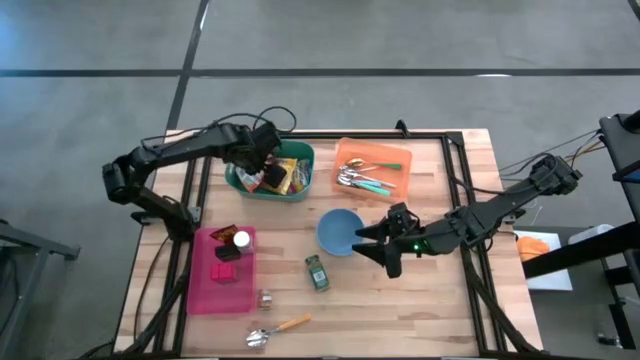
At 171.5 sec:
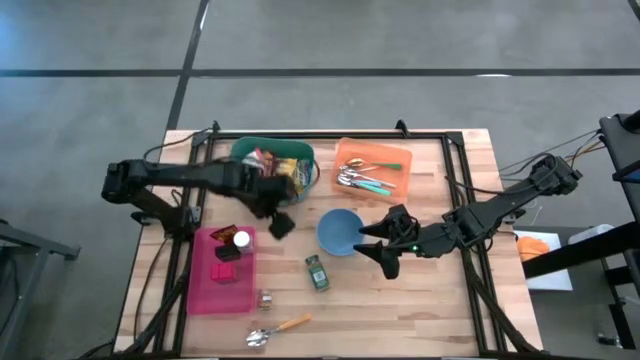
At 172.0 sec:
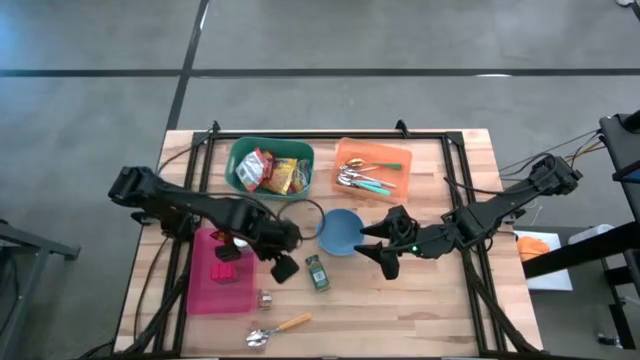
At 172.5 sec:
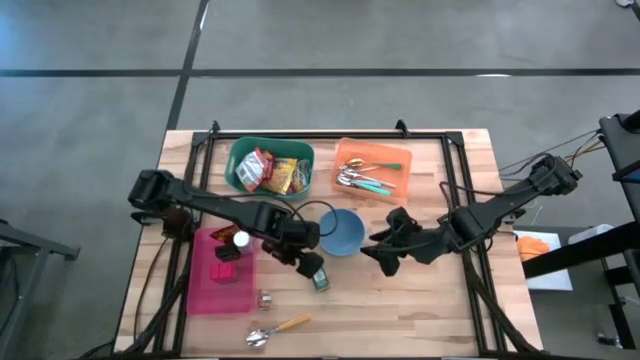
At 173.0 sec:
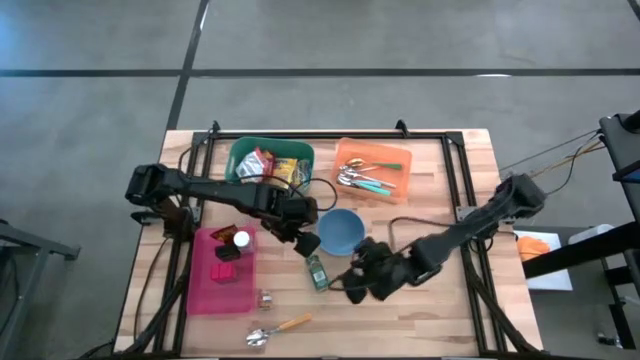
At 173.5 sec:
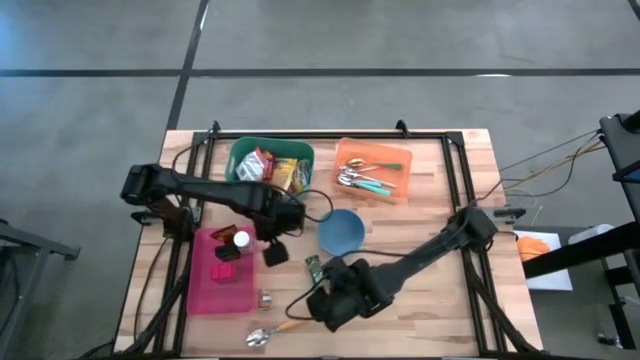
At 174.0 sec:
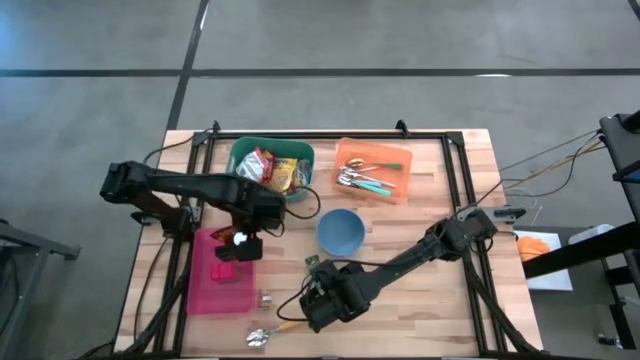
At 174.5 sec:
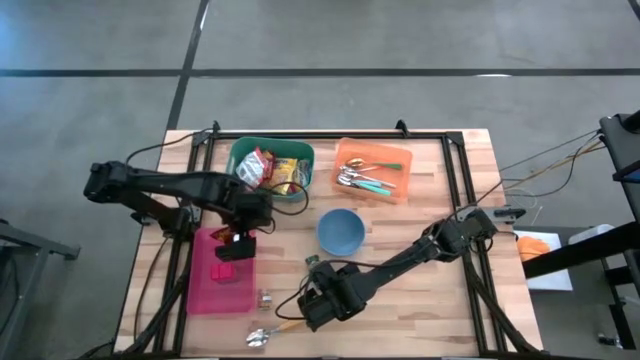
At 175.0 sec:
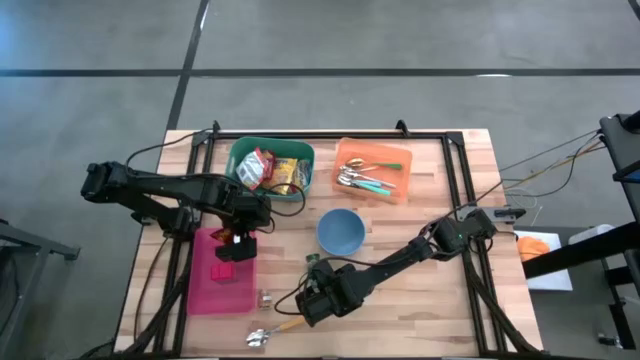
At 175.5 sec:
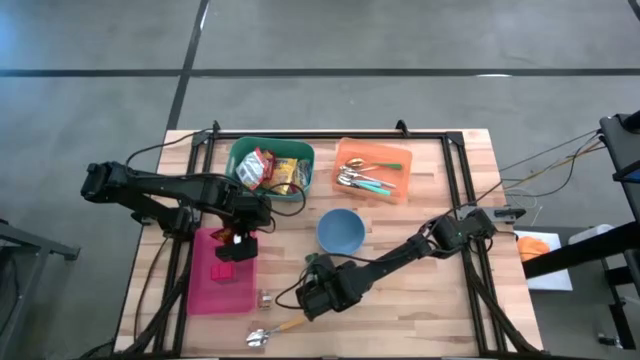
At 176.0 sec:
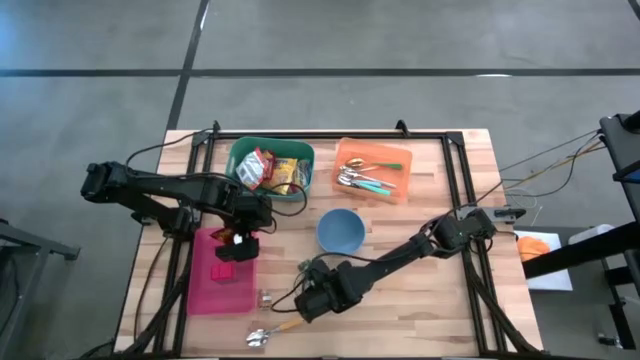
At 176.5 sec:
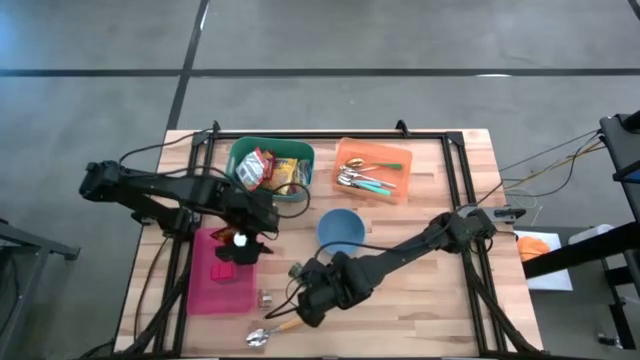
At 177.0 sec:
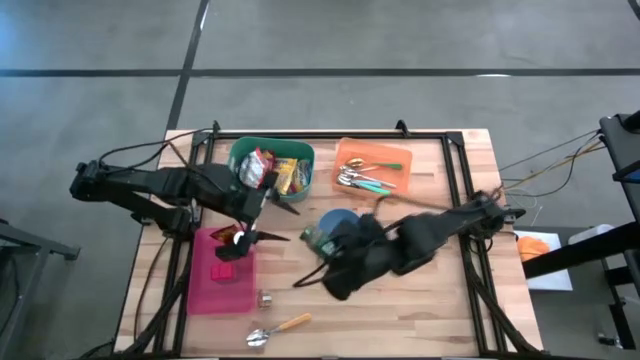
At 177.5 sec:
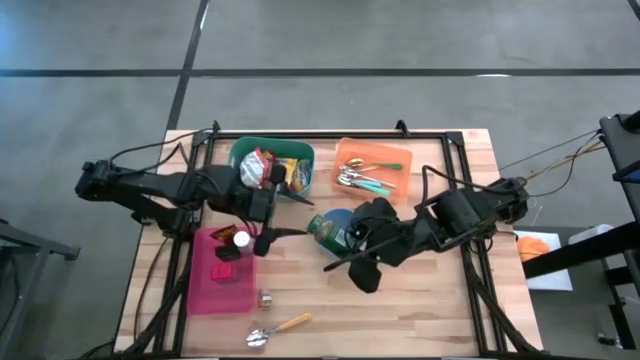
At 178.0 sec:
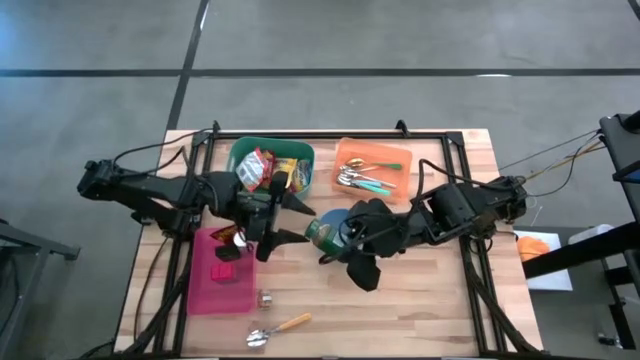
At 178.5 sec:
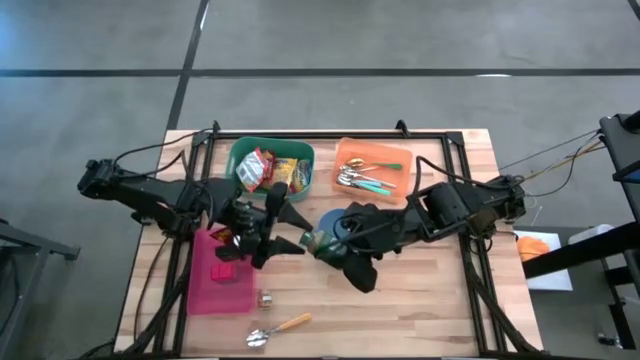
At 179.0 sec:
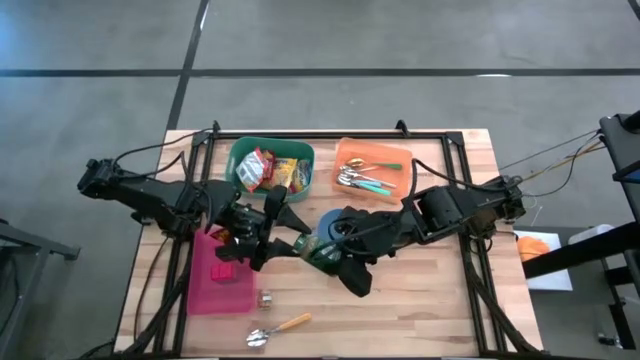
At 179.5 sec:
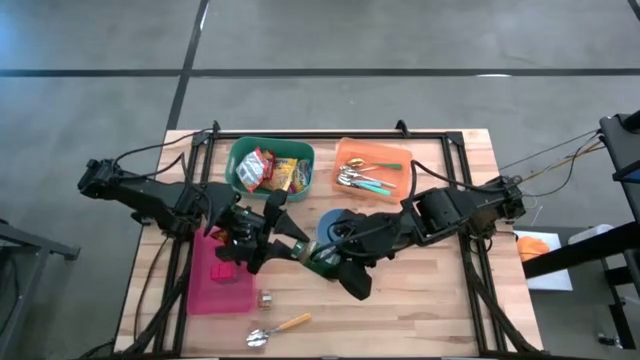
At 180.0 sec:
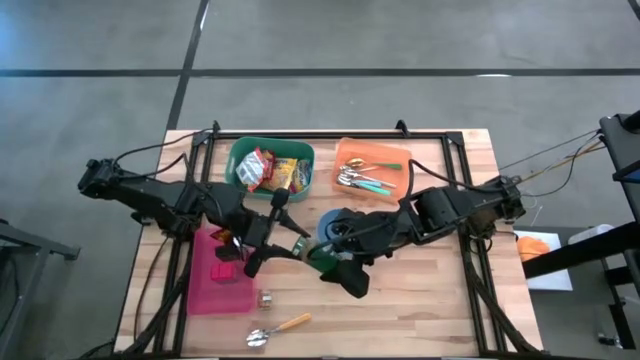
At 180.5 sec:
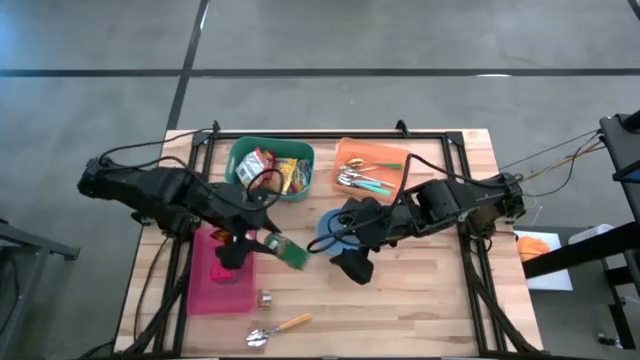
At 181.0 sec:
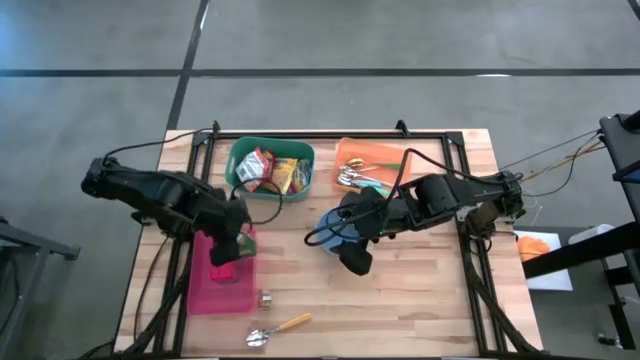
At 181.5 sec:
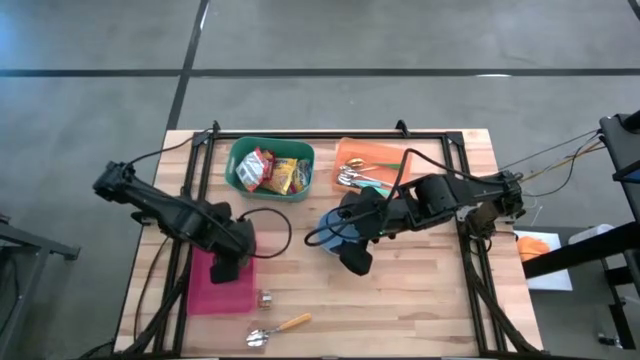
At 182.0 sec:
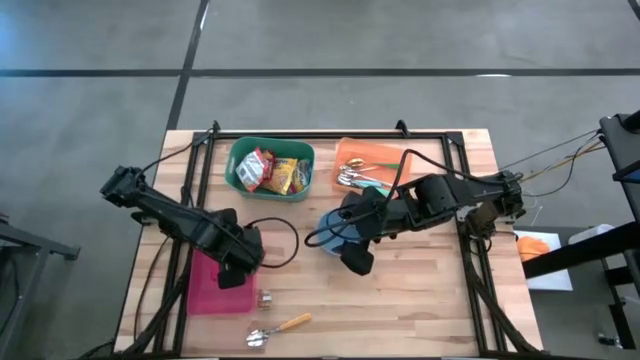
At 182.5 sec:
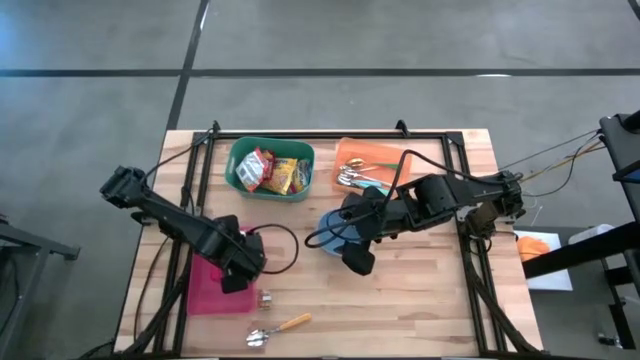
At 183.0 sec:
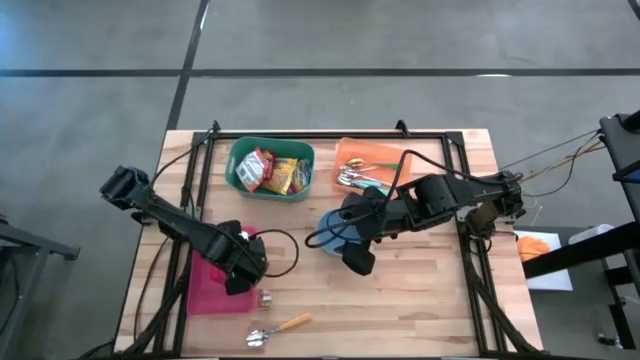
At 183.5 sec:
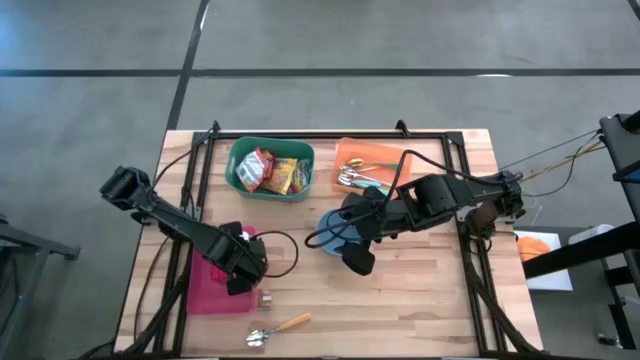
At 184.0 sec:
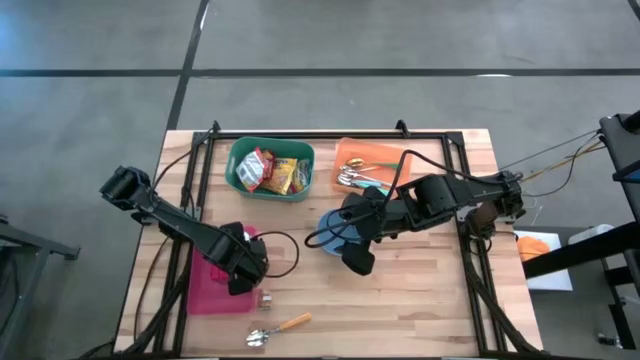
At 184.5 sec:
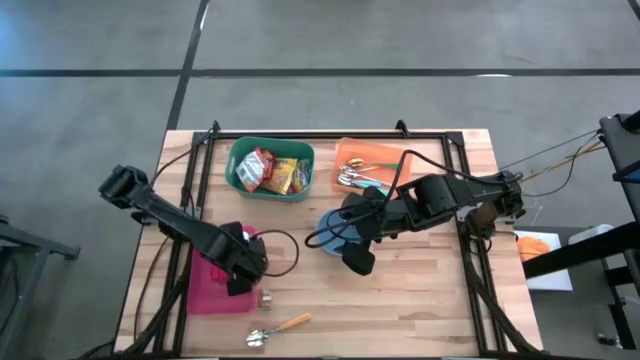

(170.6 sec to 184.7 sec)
Put the green seasoning bottle into the pink bin

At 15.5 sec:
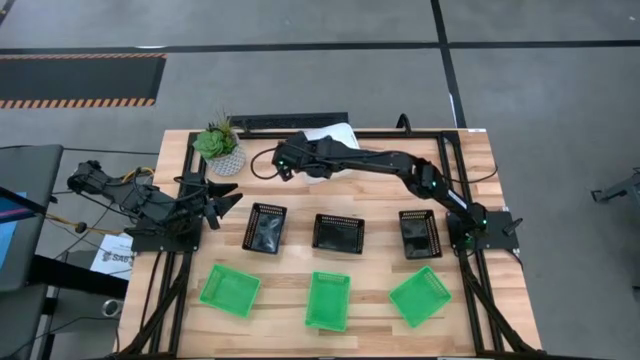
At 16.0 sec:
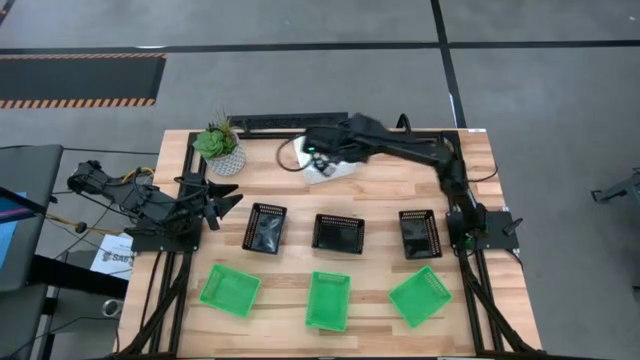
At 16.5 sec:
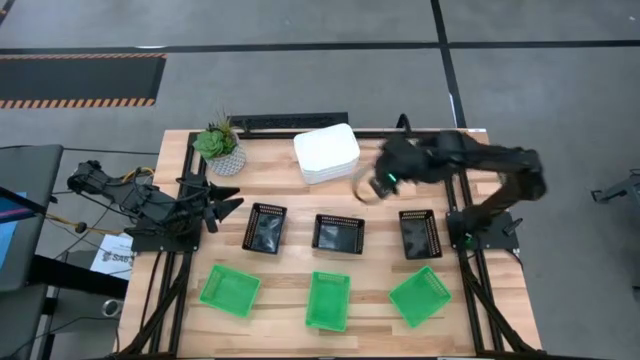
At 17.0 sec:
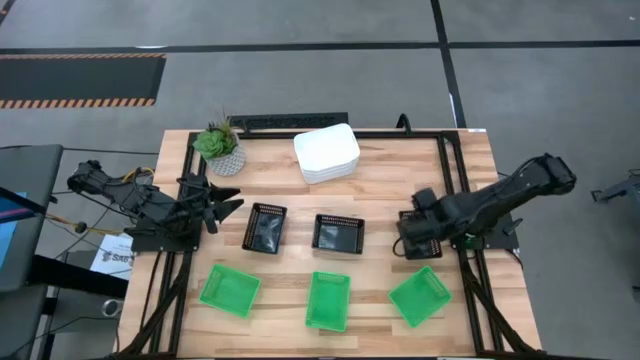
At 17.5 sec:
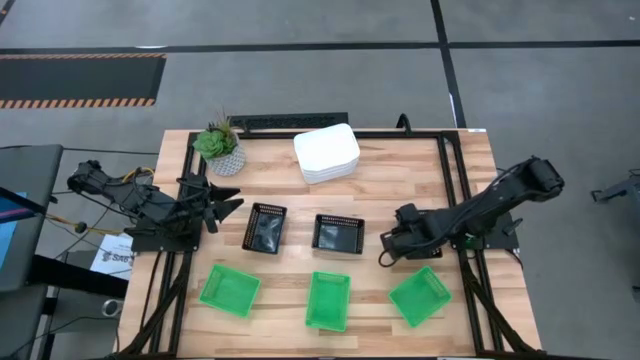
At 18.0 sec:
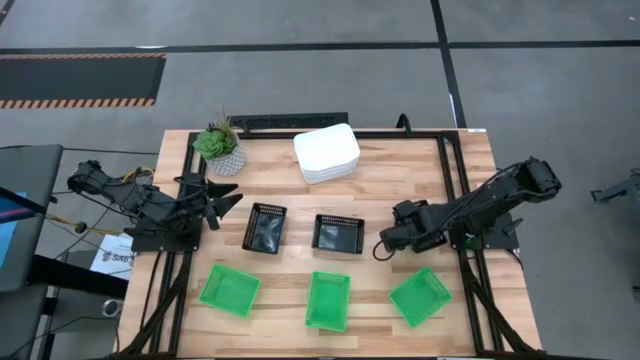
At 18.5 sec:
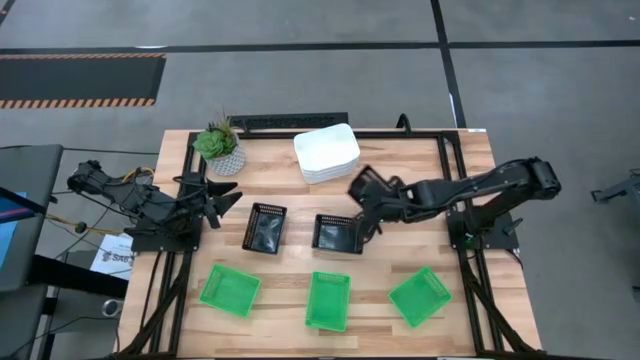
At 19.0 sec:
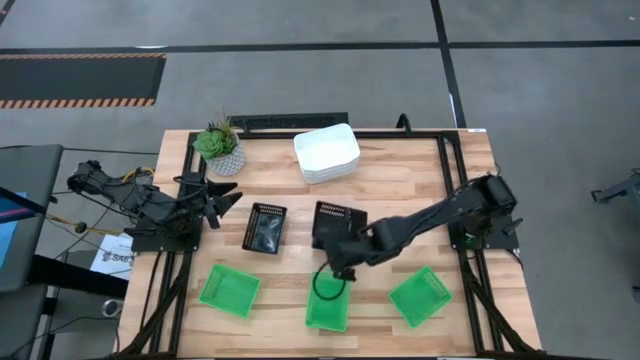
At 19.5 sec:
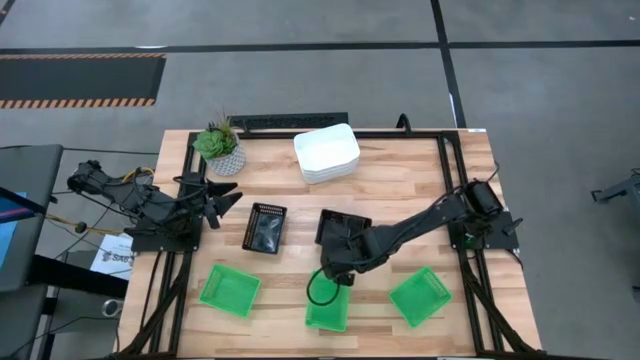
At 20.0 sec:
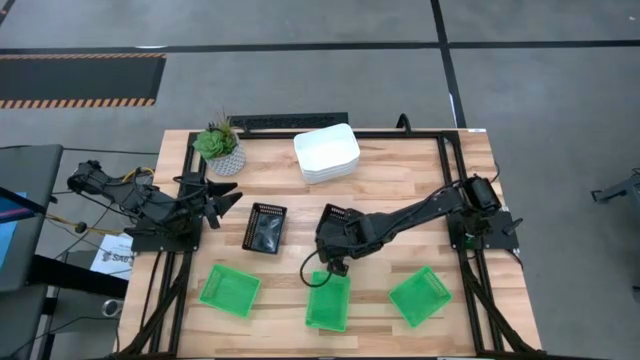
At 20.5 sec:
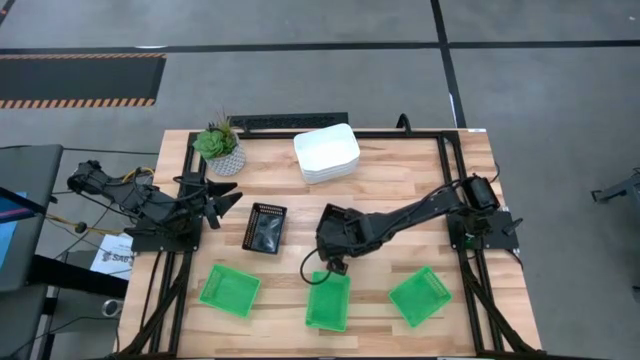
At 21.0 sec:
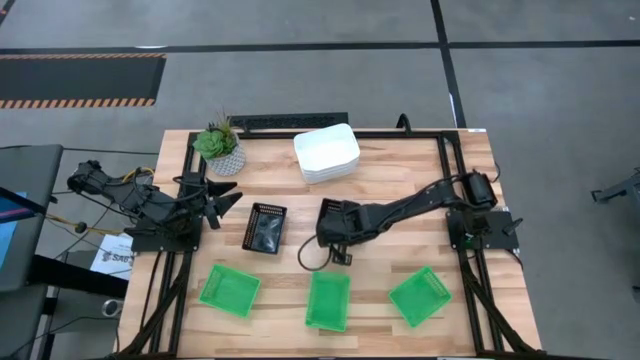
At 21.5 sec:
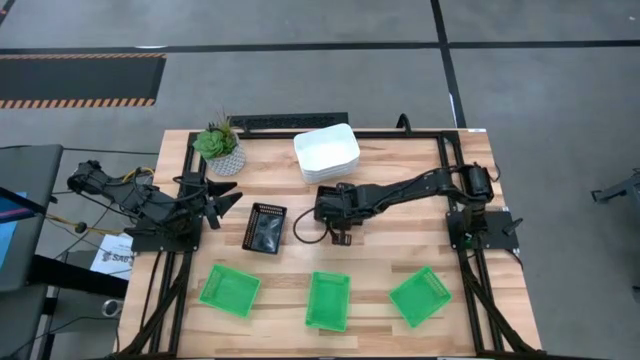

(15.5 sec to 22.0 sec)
Stack the right black bin on top of the center black bin
